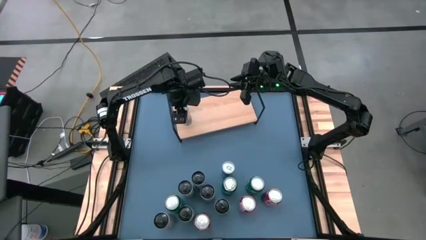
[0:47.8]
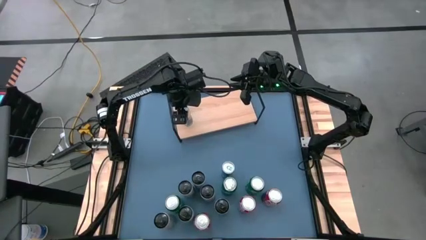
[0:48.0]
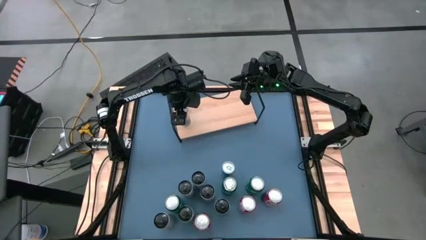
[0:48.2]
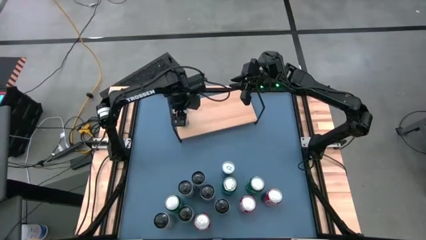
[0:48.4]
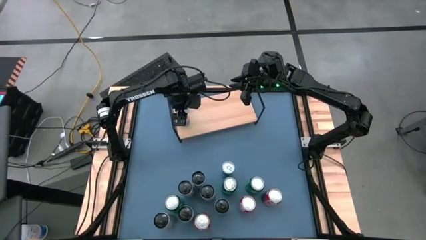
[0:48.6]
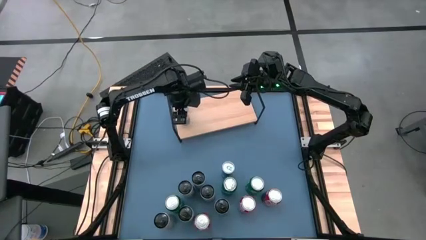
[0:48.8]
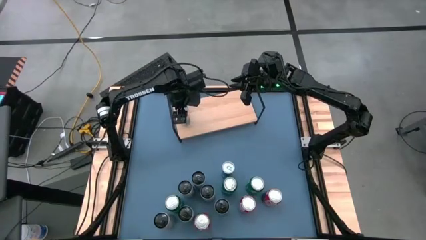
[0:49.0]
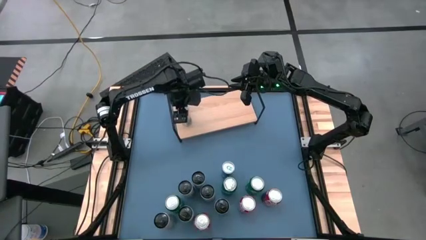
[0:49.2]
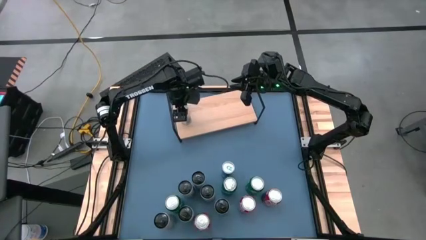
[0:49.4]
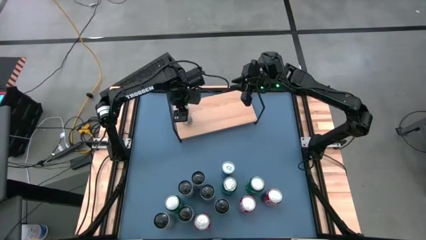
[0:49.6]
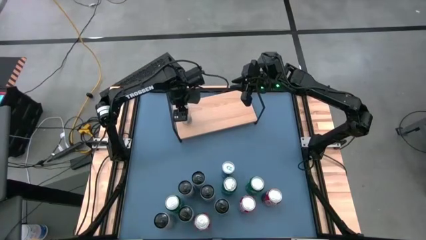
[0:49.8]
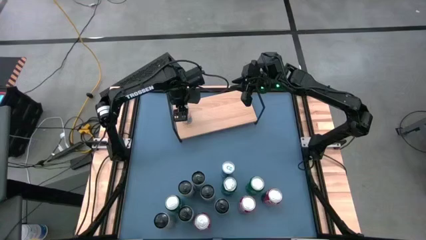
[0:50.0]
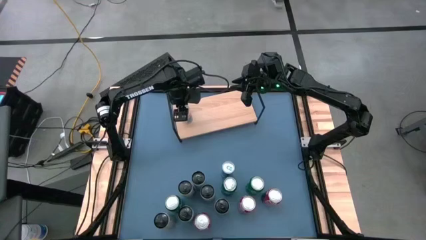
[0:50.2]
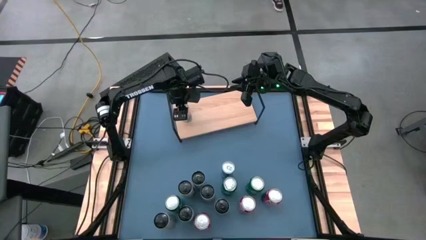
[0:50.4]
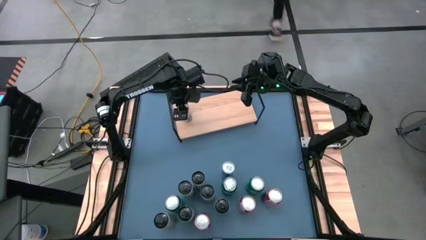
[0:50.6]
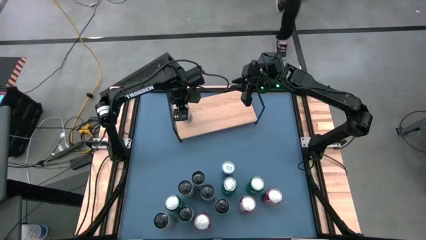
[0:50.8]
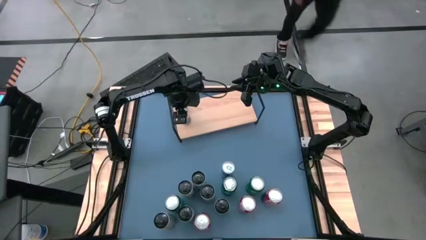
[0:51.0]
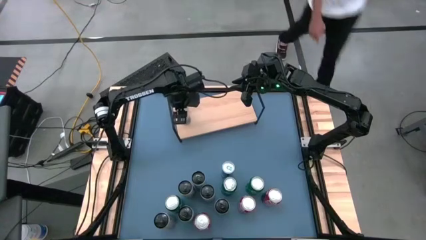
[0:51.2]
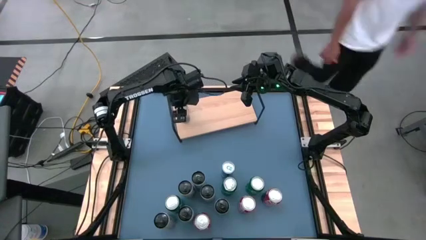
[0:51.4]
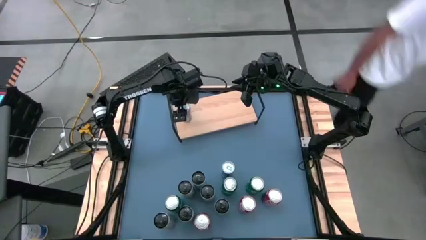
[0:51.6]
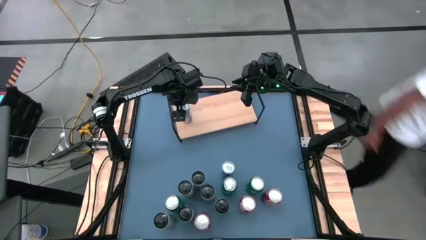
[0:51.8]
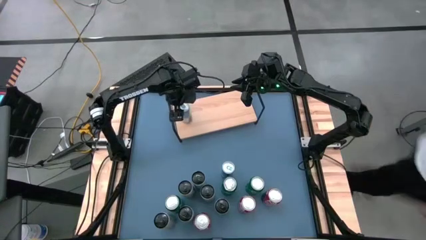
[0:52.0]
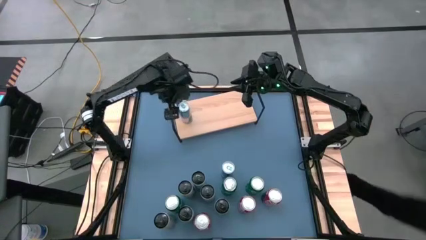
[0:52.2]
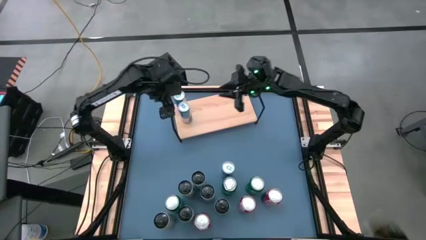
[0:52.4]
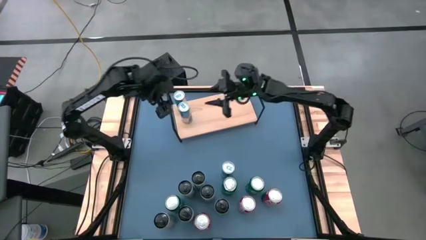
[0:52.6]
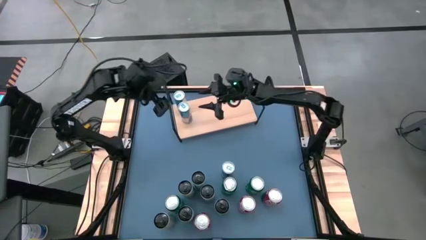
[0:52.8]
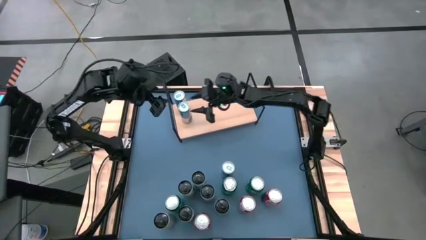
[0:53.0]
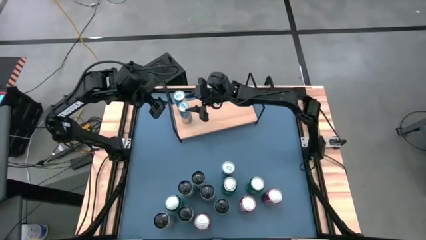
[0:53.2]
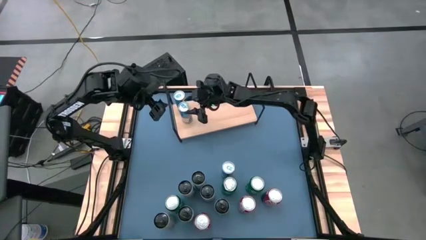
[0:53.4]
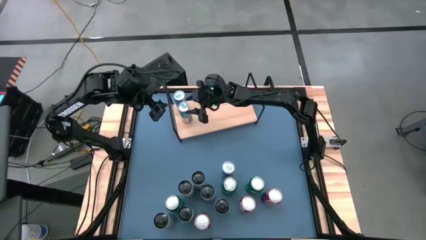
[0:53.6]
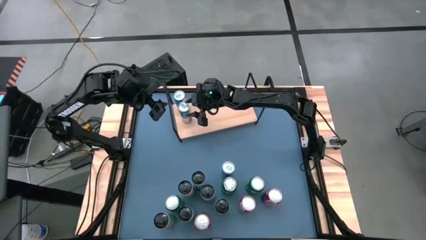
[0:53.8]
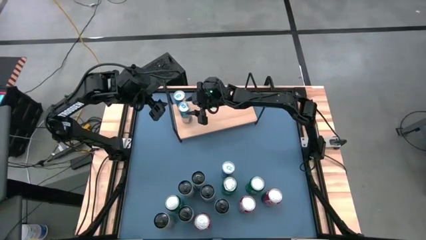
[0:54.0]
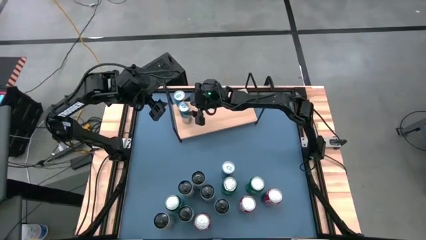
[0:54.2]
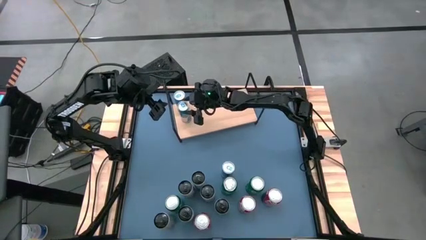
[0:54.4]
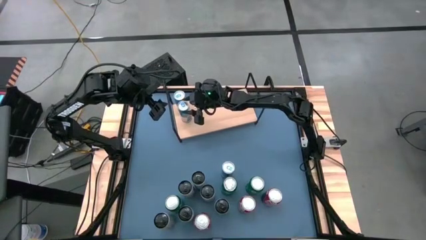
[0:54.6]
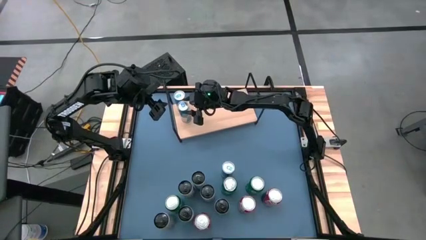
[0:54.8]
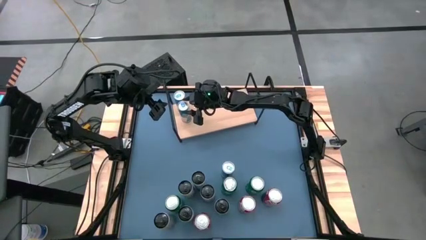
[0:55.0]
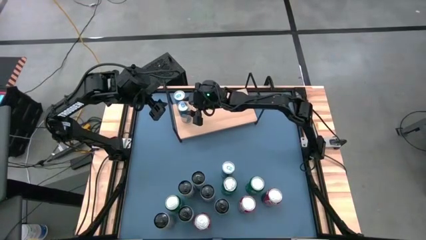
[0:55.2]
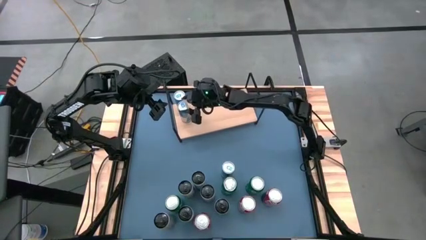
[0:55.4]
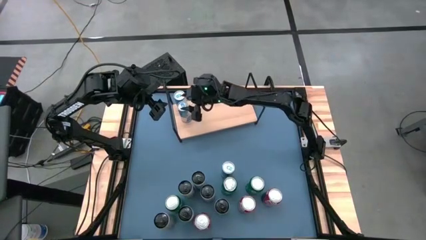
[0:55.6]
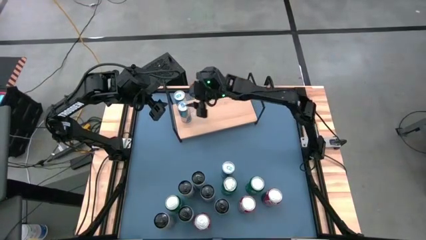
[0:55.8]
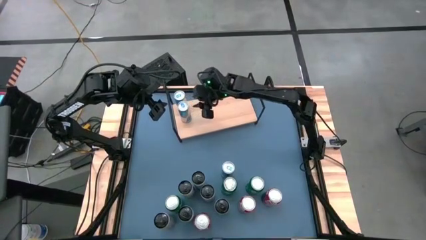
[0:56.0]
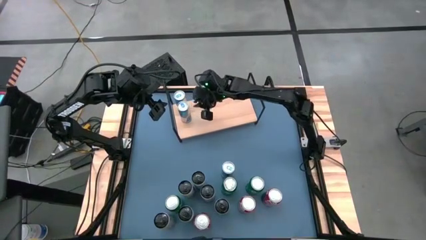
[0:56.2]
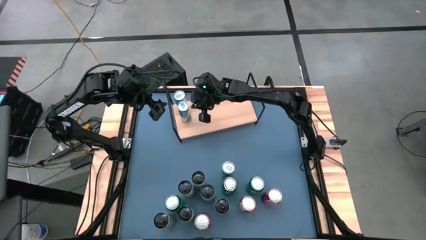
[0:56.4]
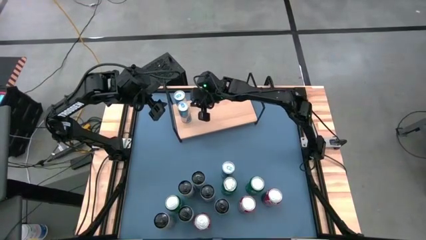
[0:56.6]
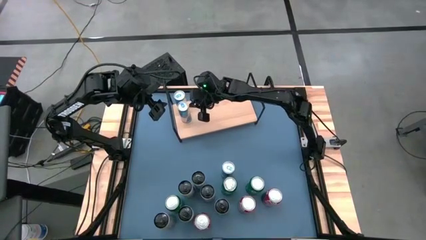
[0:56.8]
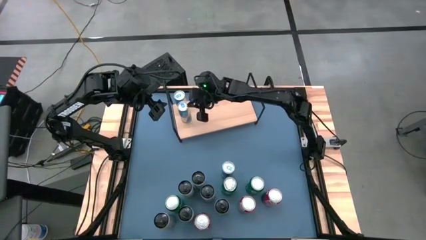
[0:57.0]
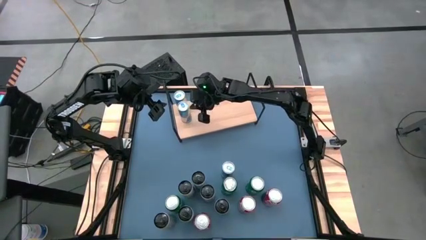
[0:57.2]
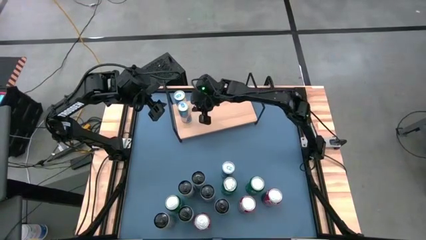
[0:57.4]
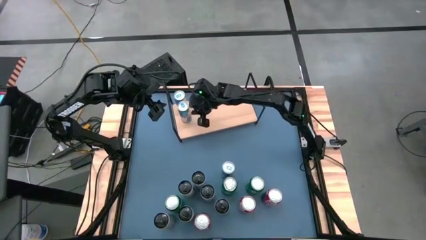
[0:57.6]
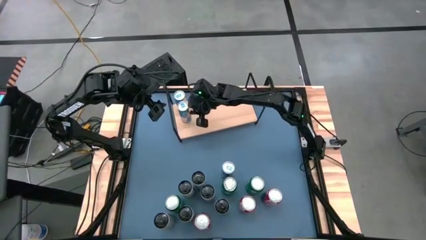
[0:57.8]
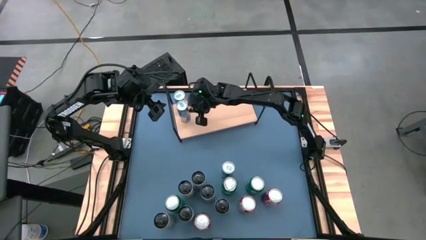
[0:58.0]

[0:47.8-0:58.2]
Task: Place canned beverage on shelf
Put the bottom blue soda can on the shelf aligned with the other blue soda can
